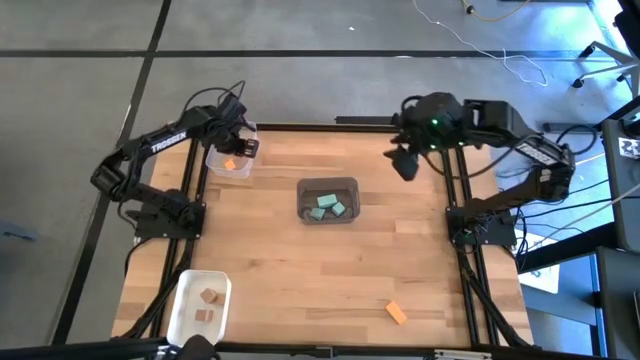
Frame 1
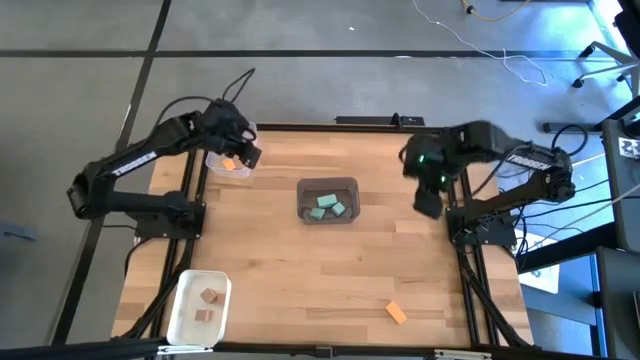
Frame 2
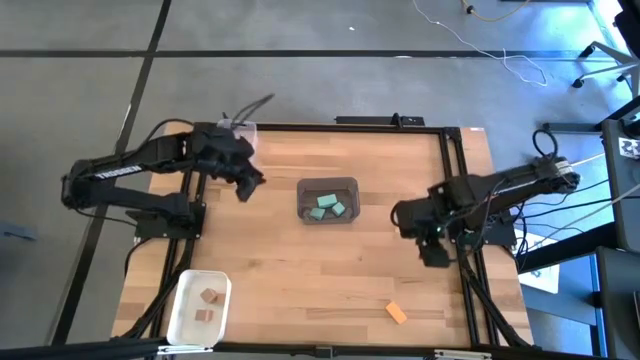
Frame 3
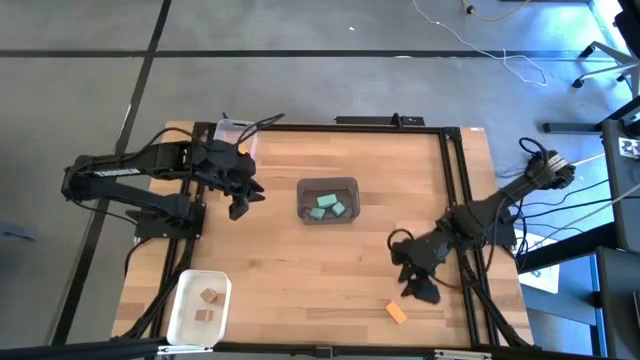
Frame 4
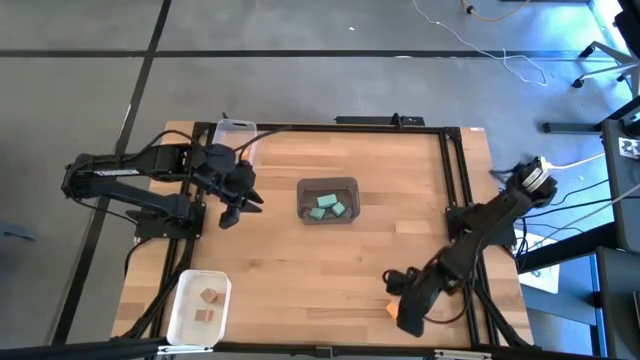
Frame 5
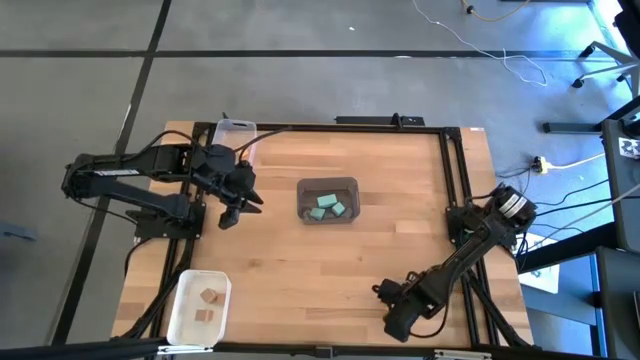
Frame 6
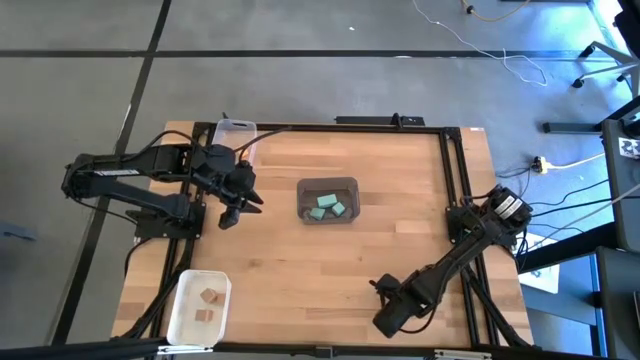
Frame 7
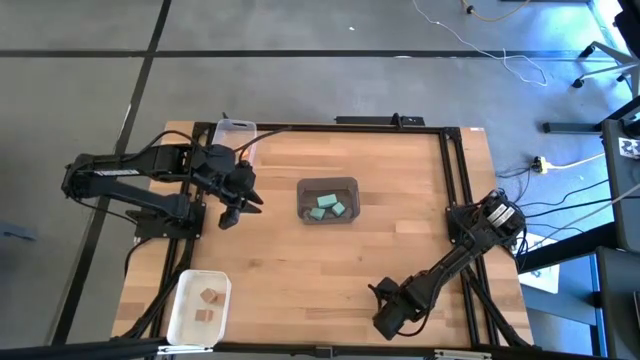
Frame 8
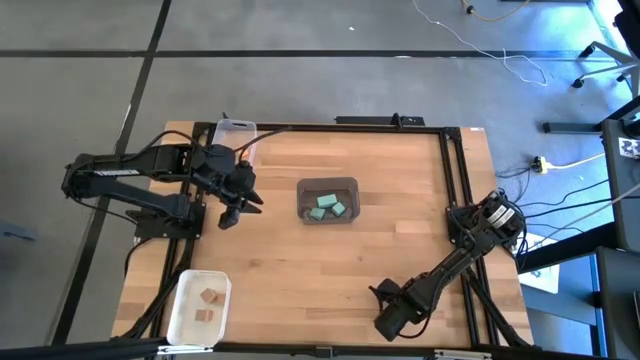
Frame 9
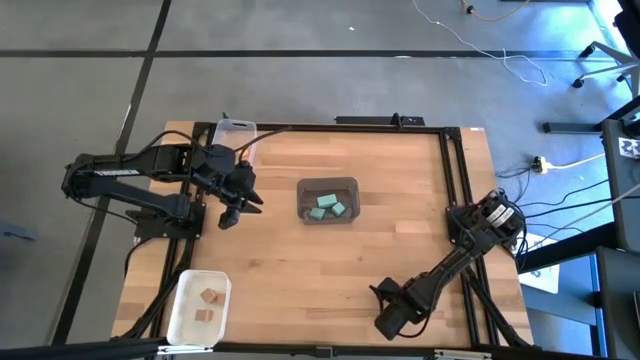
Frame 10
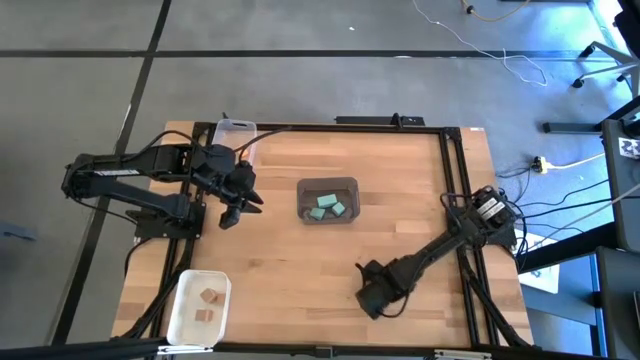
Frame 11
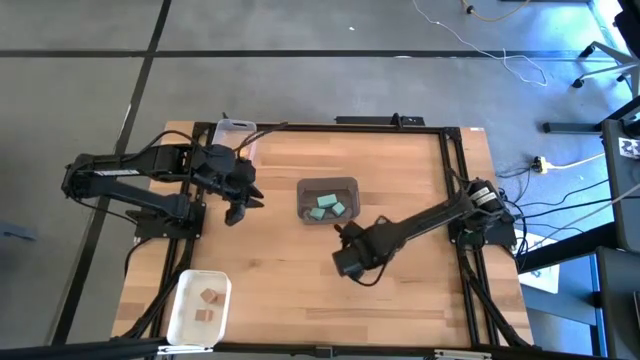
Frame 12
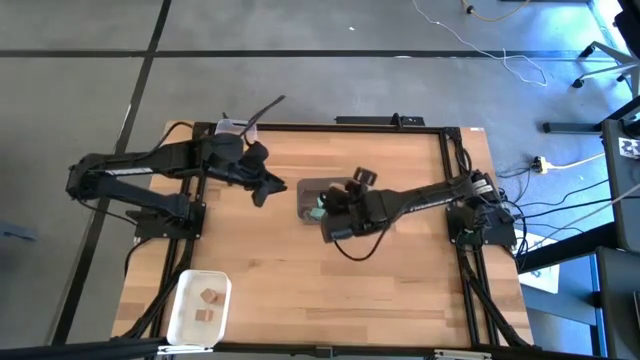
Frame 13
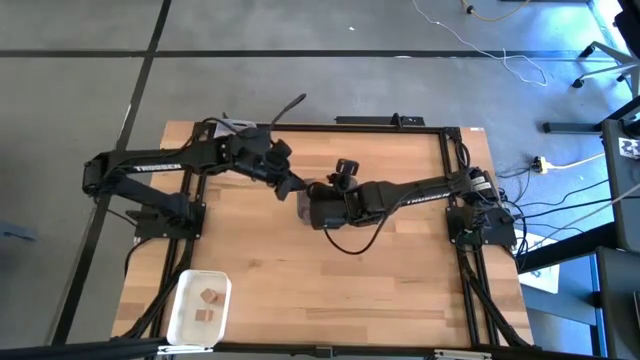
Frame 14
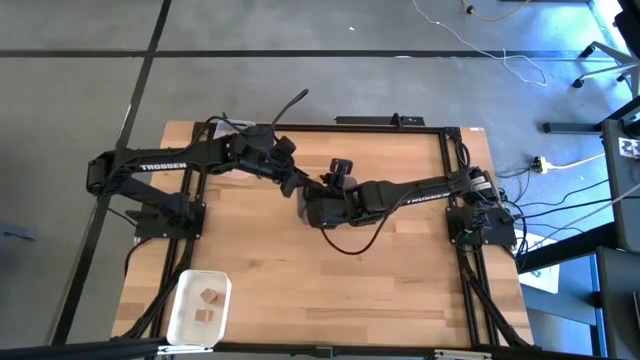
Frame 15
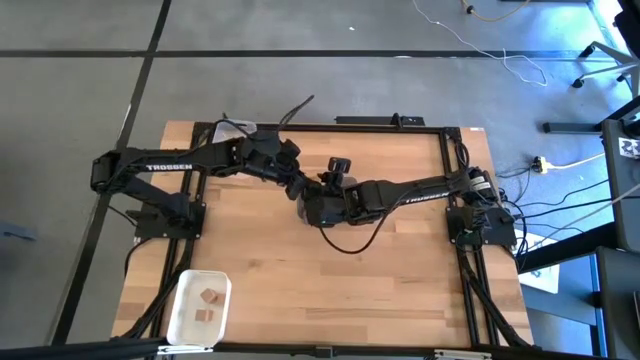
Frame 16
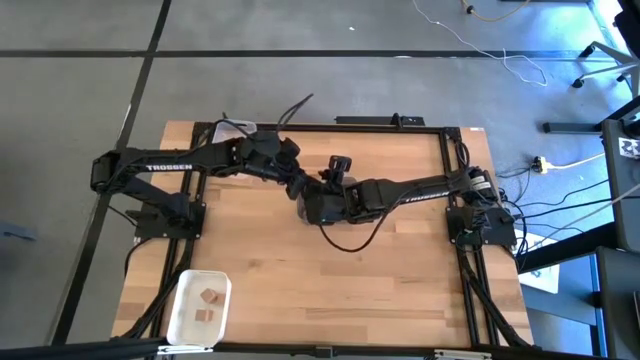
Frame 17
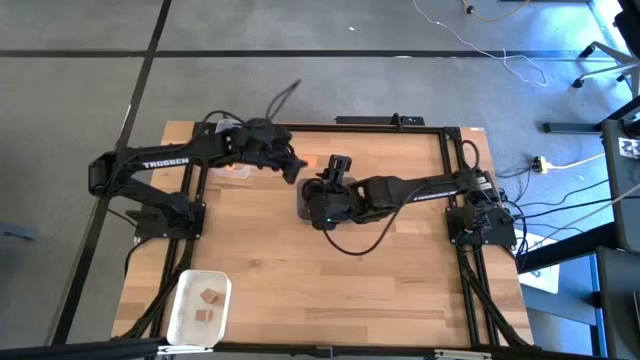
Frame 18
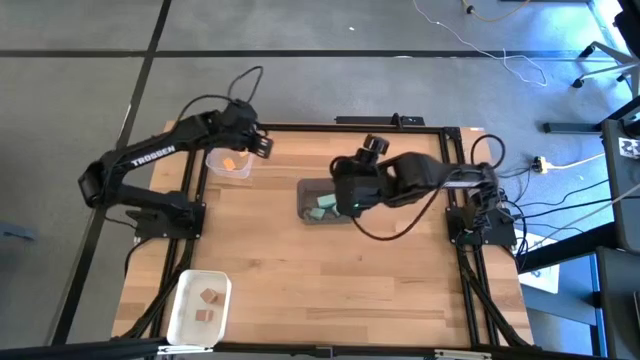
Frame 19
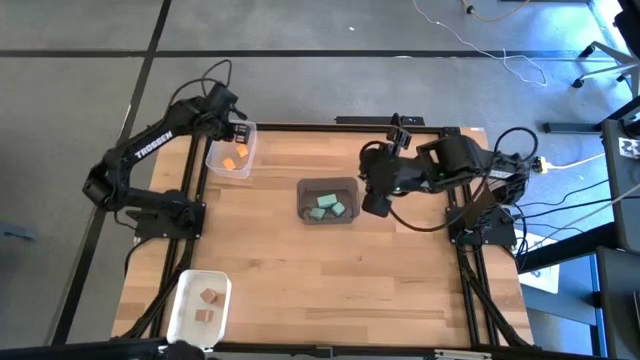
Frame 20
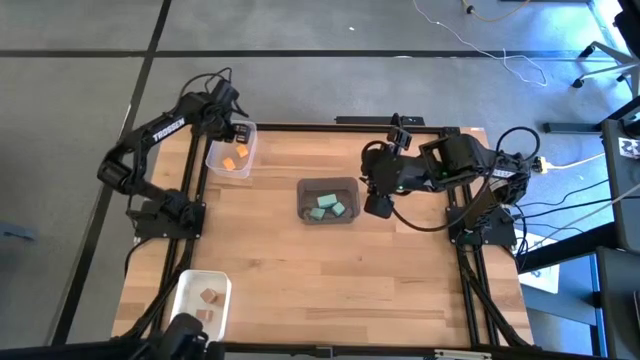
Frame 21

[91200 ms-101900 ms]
Task: Sort & place blocks by color
Put the yellow block into the transparent bin

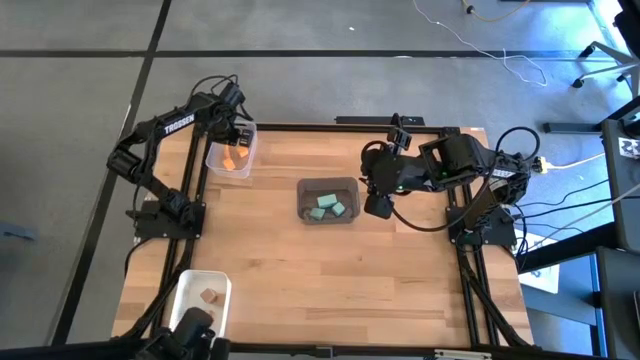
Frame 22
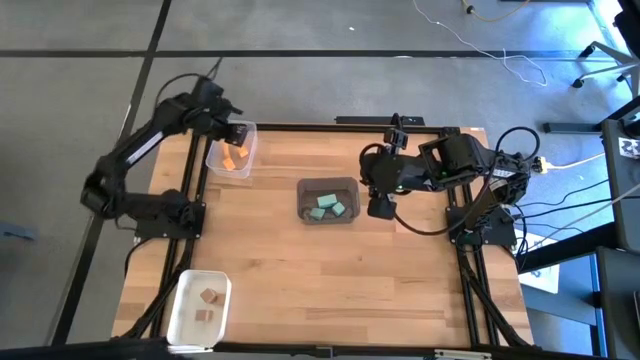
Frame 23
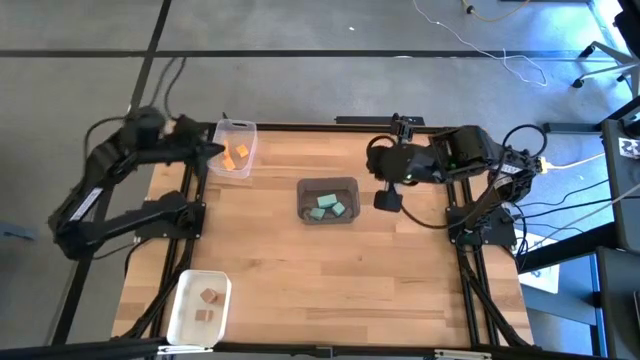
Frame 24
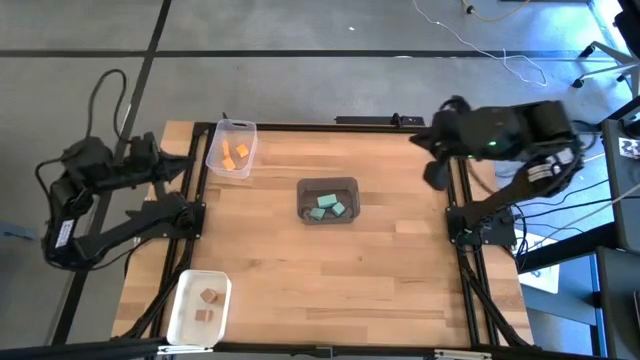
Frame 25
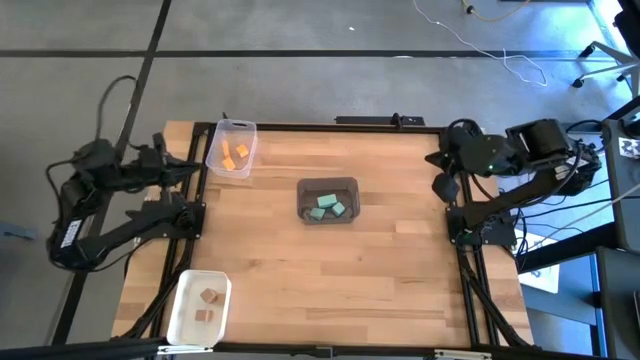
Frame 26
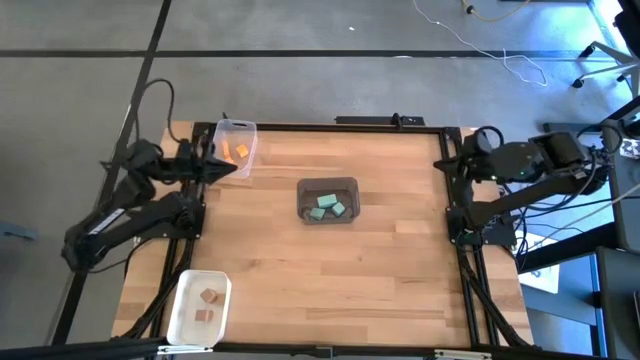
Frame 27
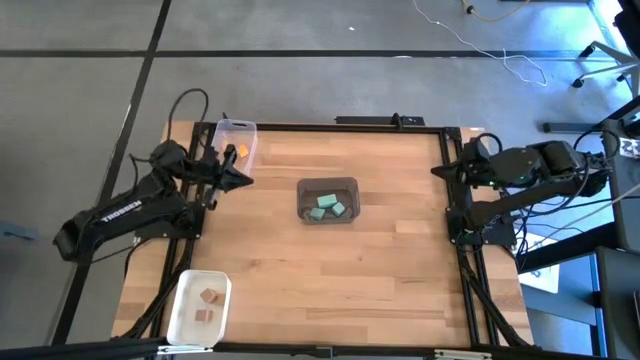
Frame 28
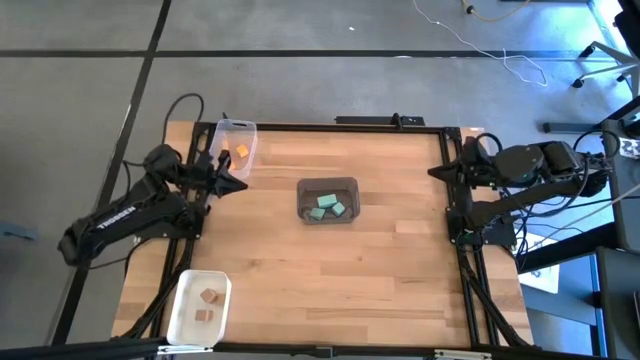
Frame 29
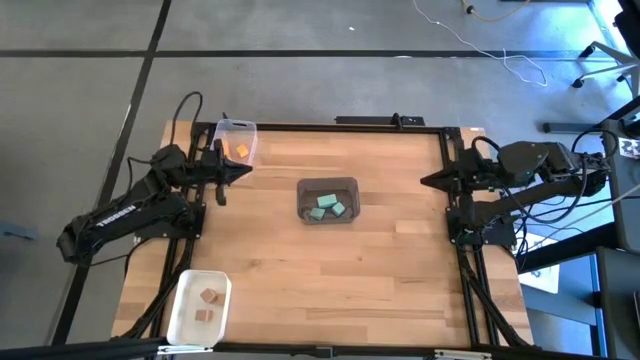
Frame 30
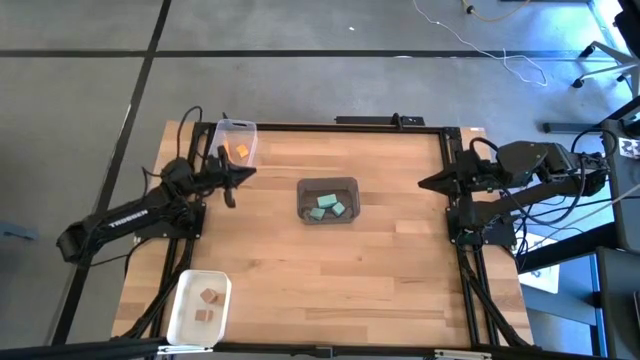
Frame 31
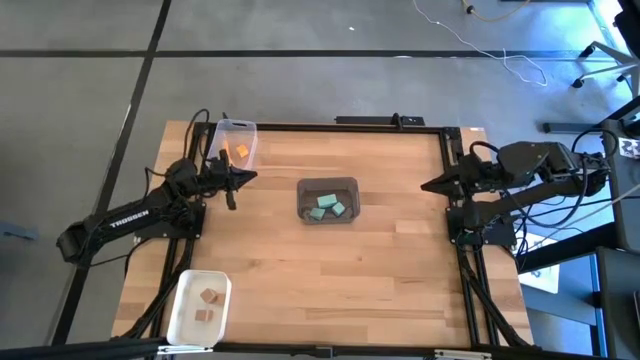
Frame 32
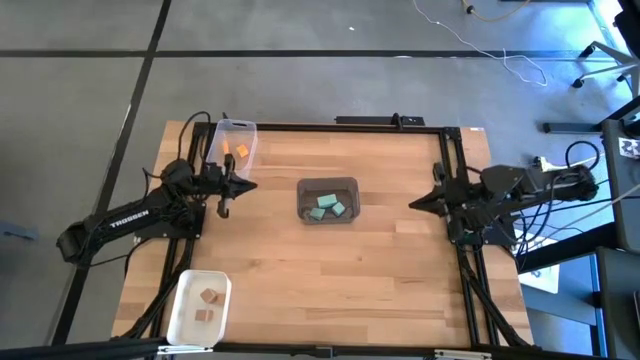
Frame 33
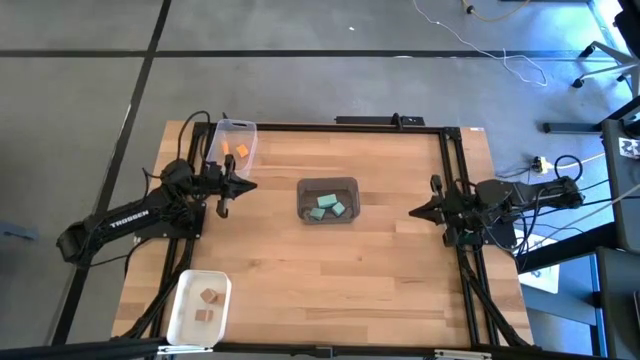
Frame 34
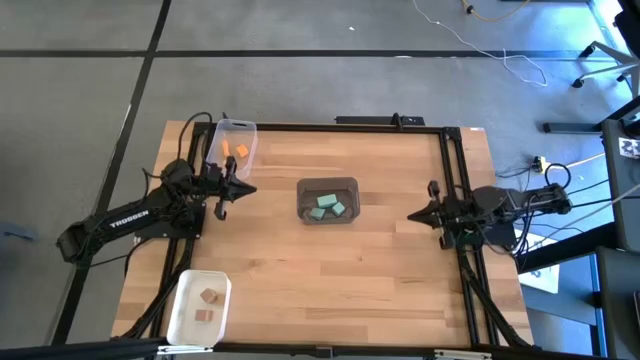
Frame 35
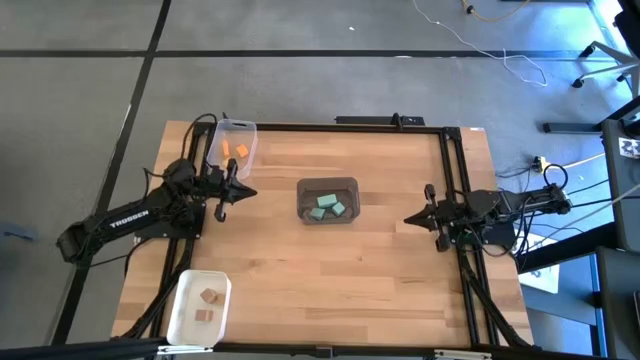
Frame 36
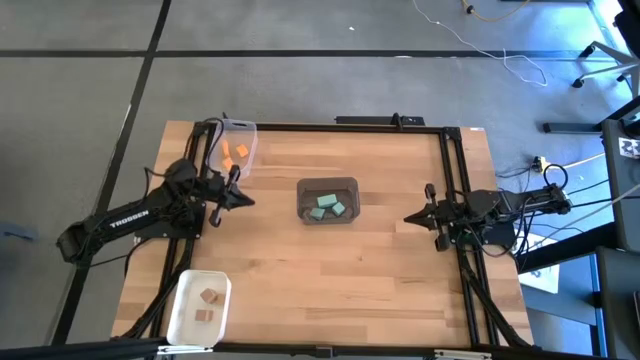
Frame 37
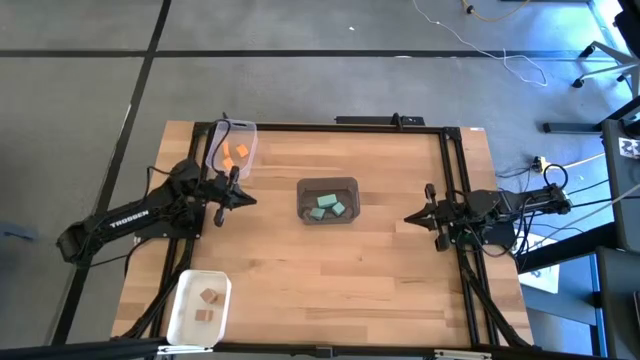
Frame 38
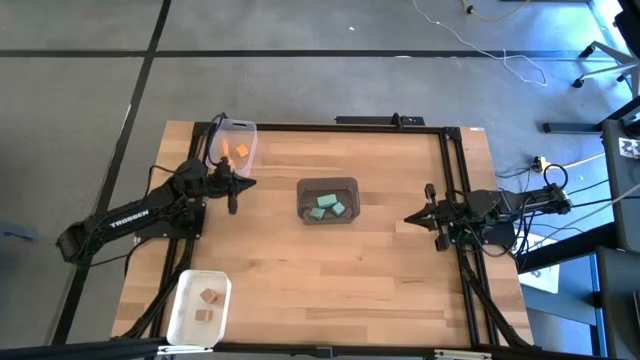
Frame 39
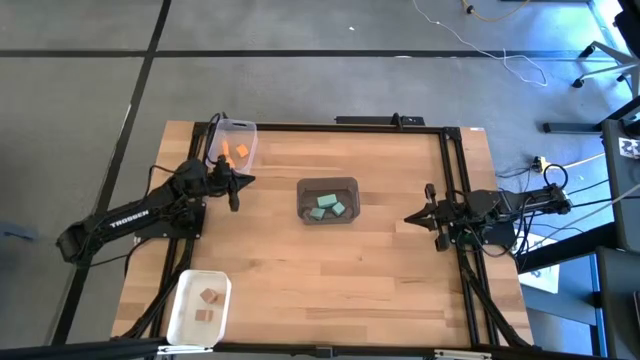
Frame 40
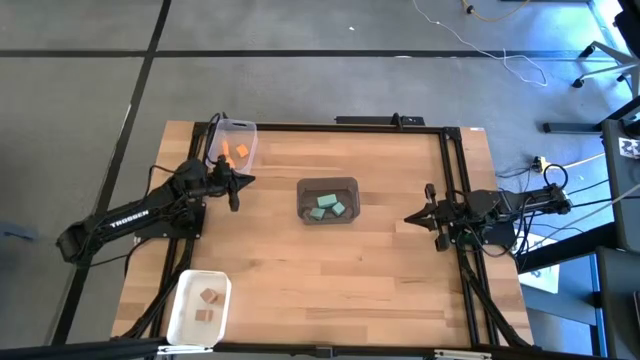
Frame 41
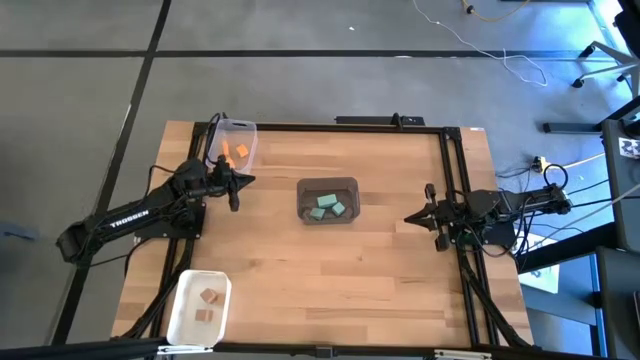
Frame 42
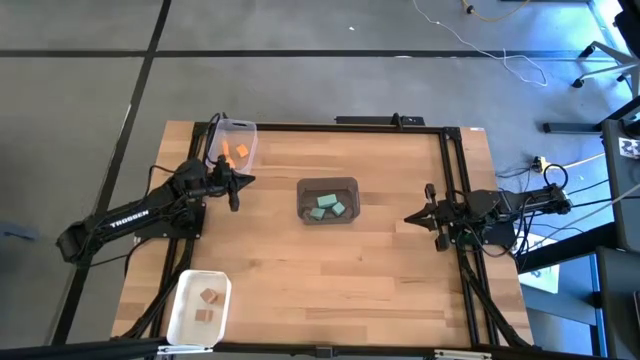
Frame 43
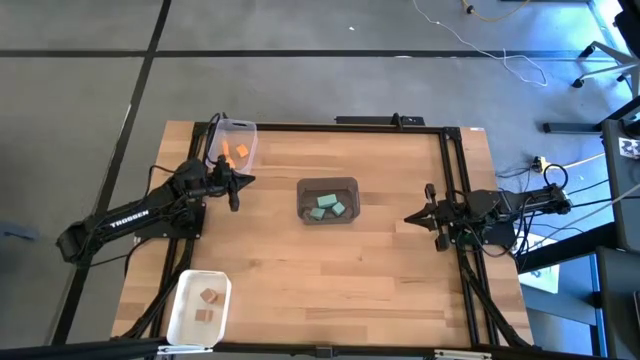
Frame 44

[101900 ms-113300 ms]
Return to Home Position
